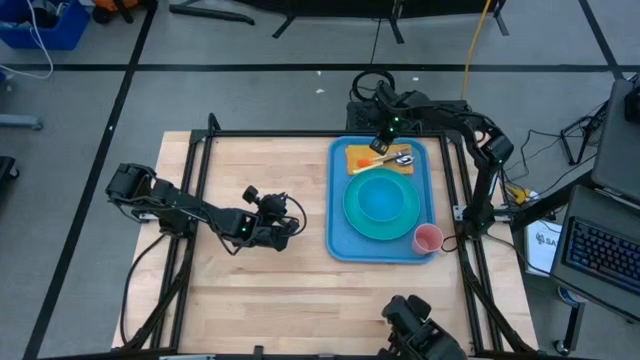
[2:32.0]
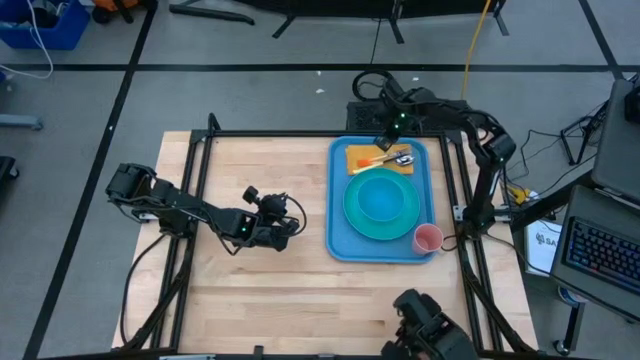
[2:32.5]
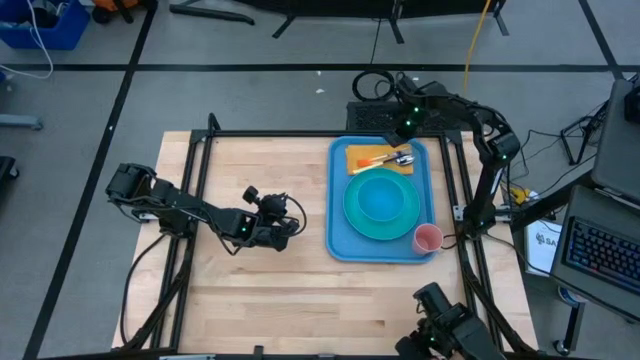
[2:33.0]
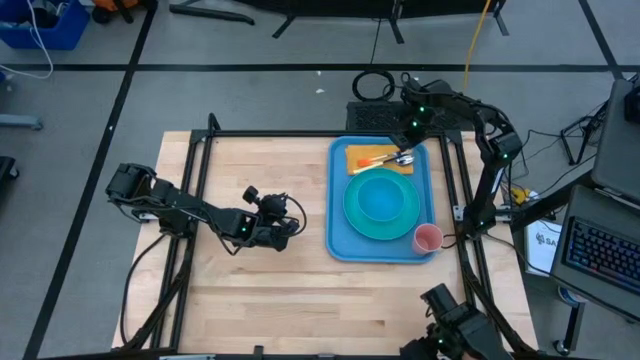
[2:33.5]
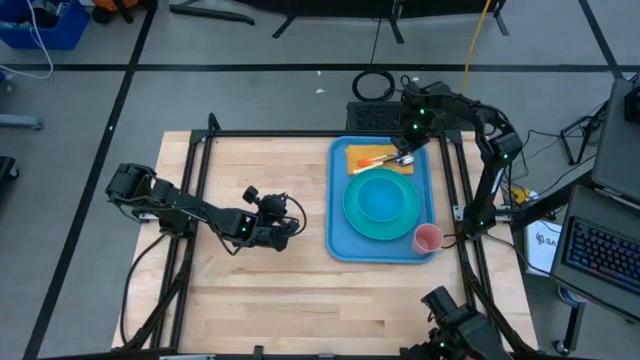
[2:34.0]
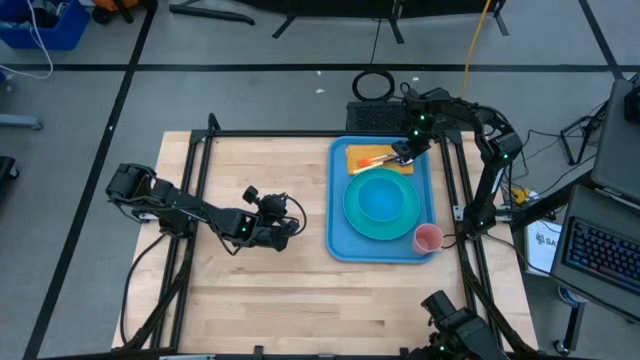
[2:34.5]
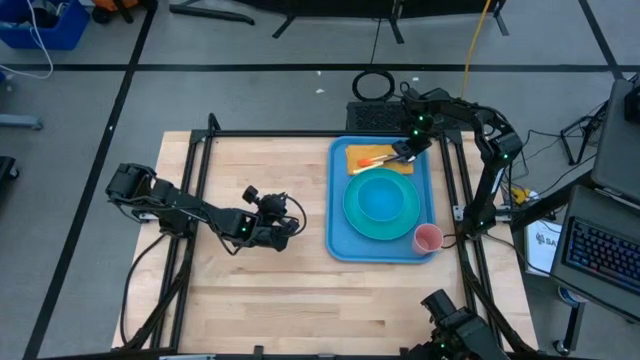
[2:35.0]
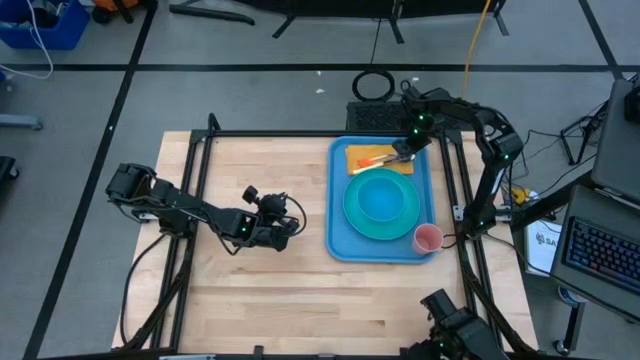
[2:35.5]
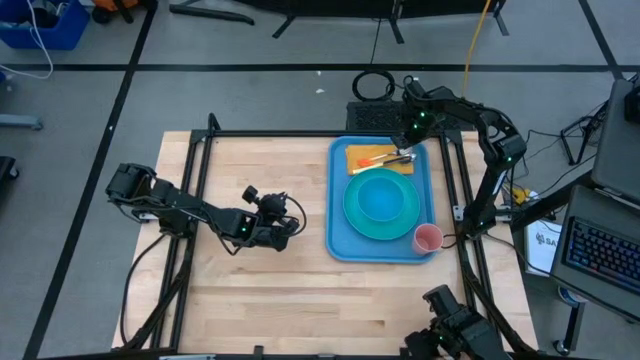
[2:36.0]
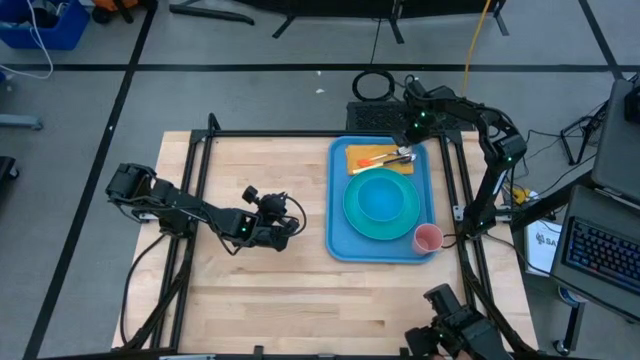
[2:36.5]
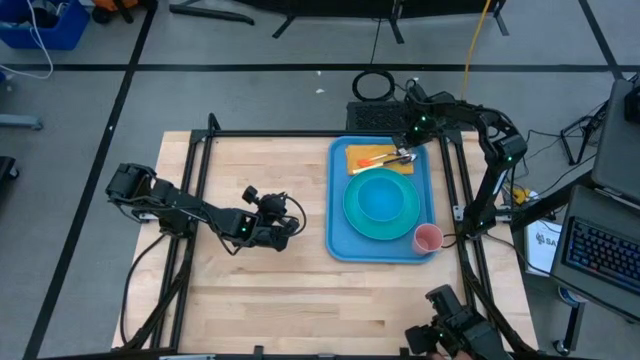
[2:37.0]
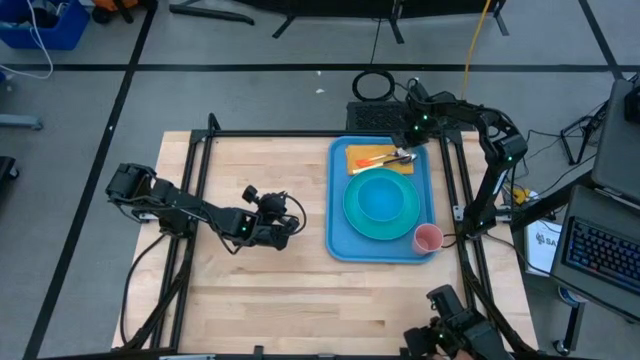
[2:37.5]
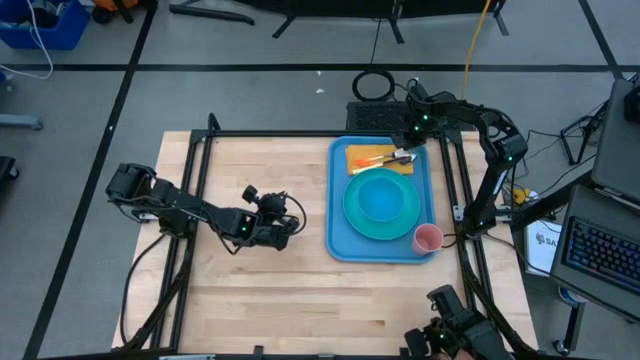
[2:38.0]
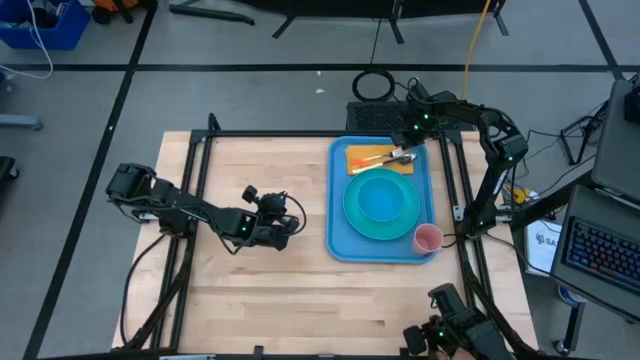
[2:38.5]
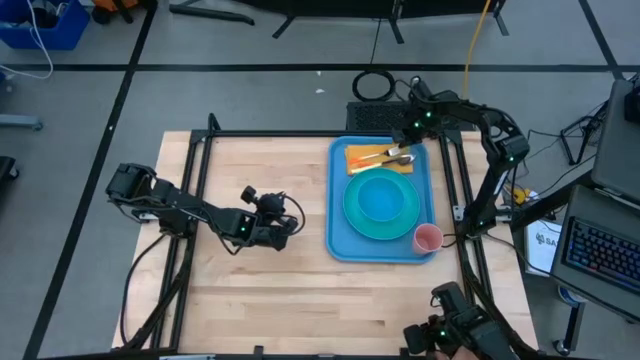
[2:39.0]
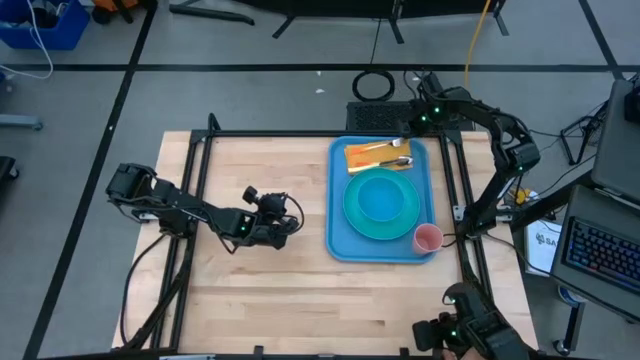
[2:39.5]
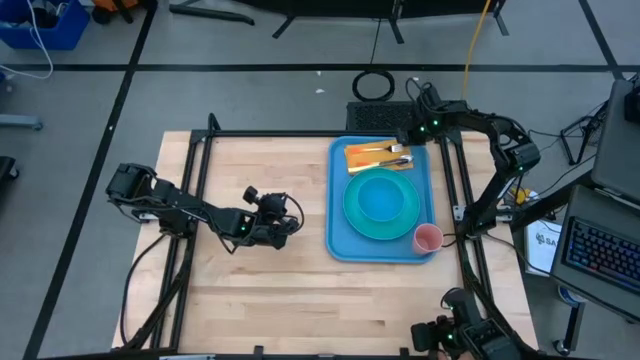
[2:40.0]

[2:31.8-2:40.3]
Task: Set up tray
Adjust the fork on the yellow table napkin on the blue serving tray

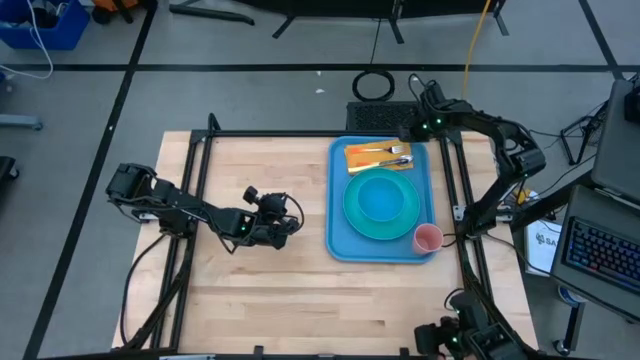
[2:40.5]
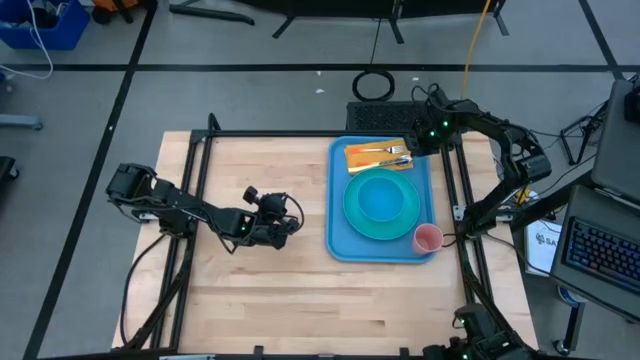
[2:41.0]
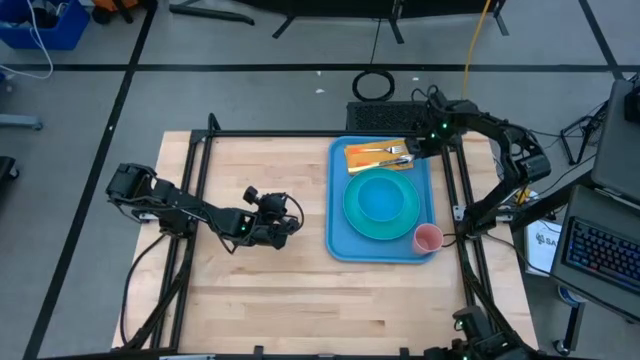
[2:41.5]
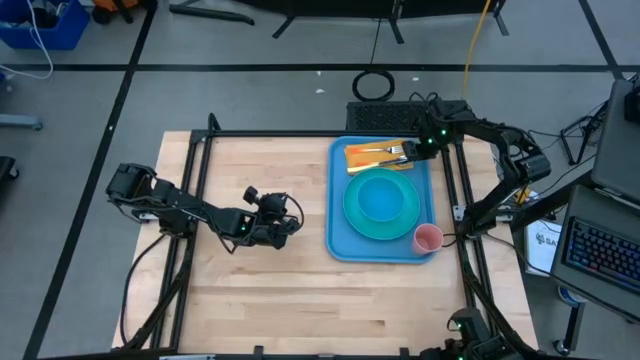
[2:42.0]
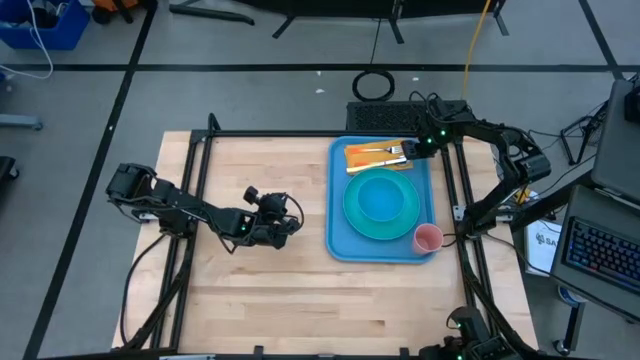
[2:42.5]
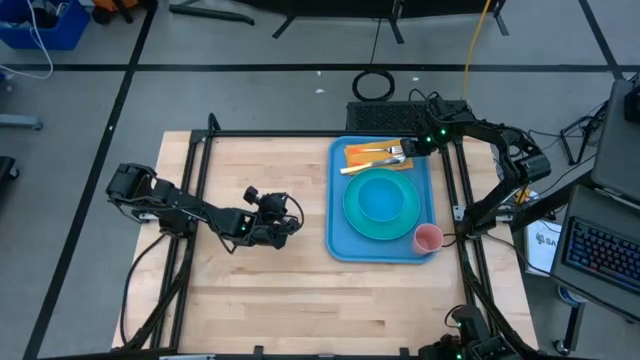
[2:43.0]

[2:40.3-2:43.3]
Adjust the orange spoon on the yellow table napkin on the blue serving tray

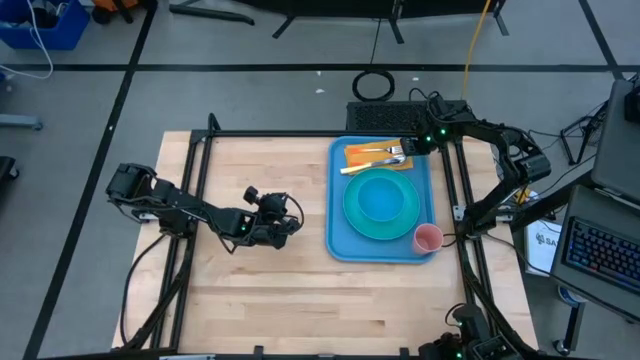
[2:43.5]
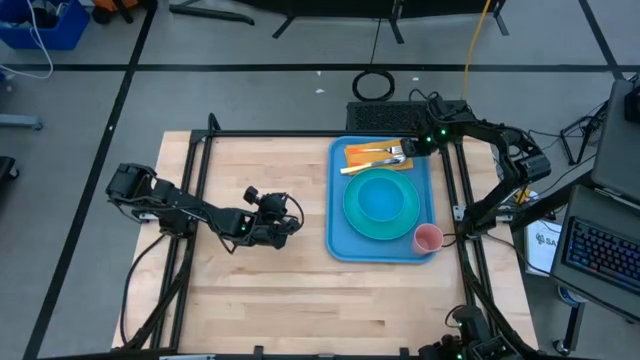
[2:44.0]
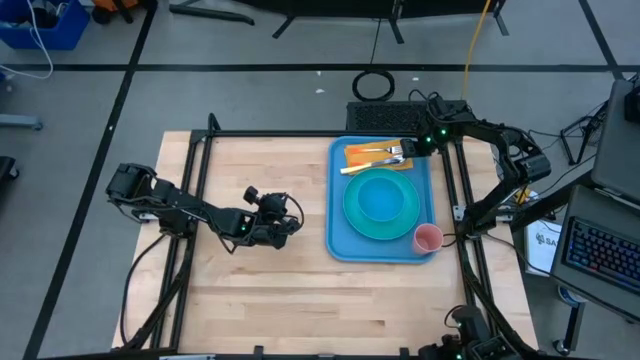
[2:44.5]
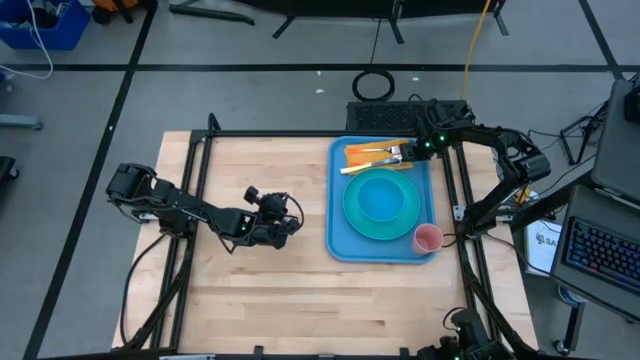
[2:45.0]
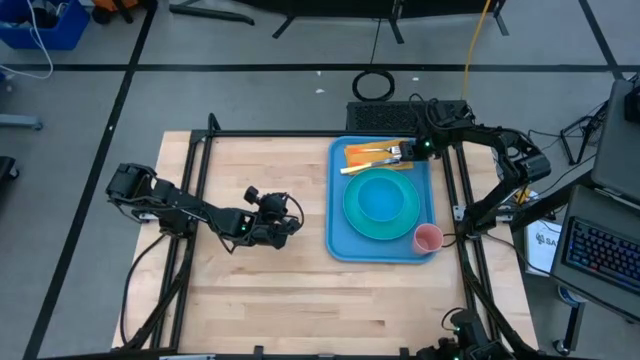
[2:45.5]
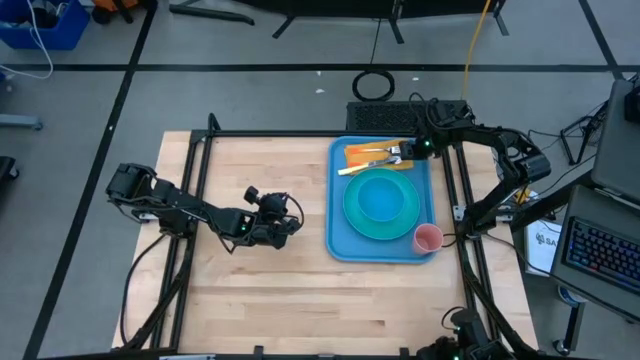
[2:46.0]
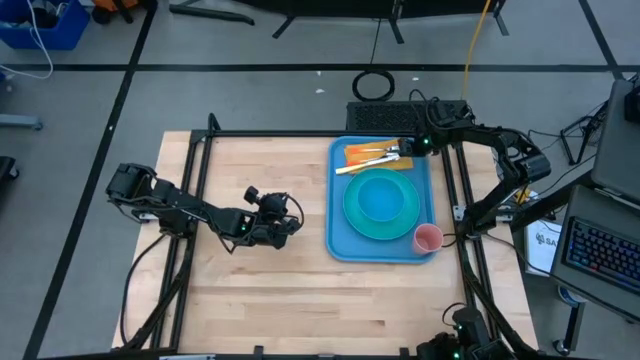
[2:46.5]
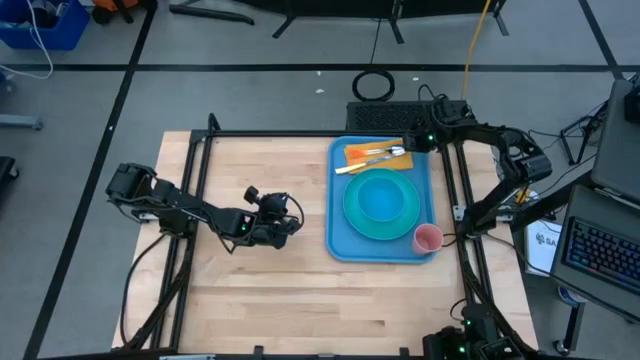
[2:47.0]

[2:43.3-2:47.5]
Adjust the orange spoon on the yellow table napkin on the blue serving tray

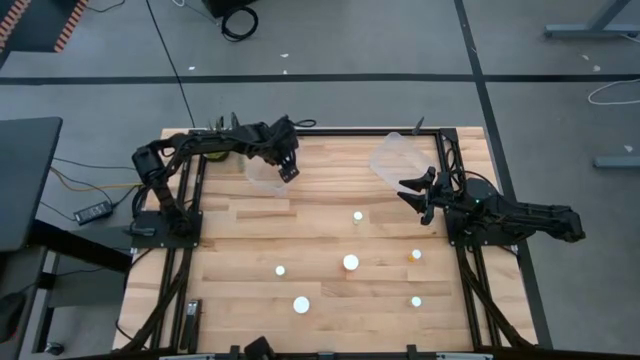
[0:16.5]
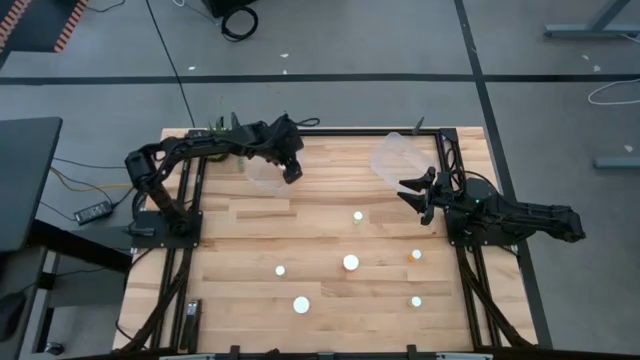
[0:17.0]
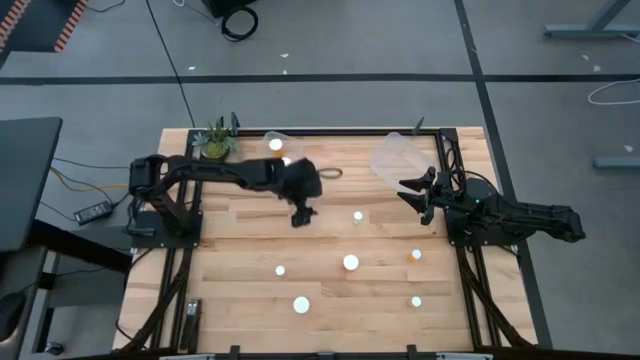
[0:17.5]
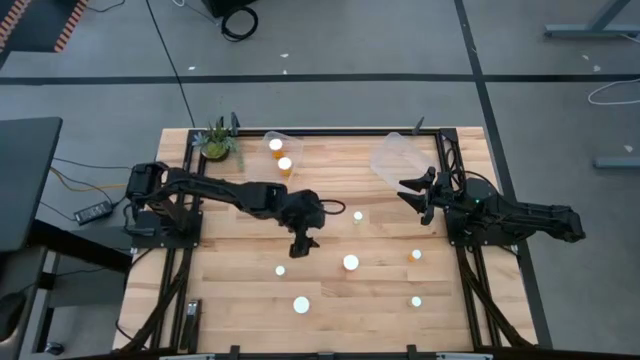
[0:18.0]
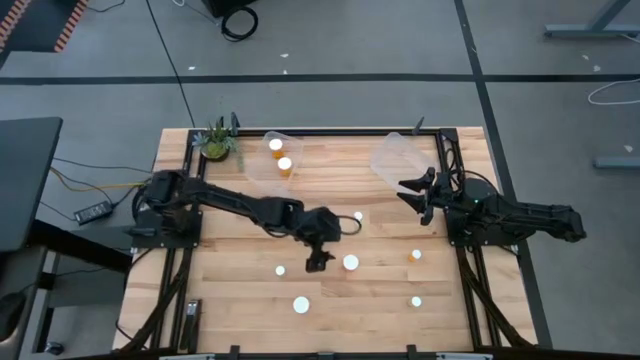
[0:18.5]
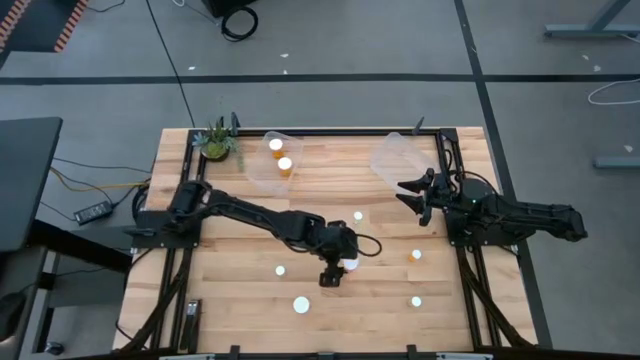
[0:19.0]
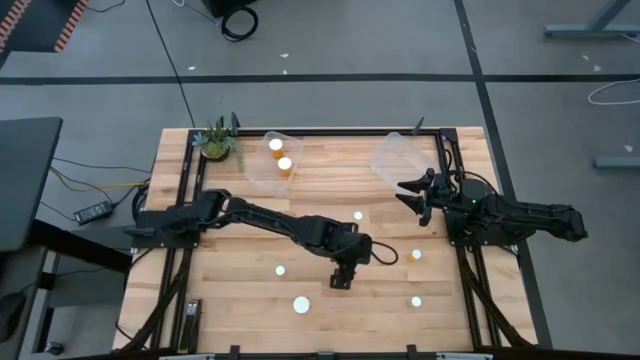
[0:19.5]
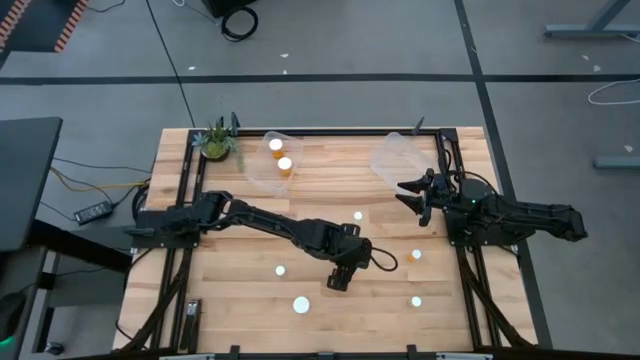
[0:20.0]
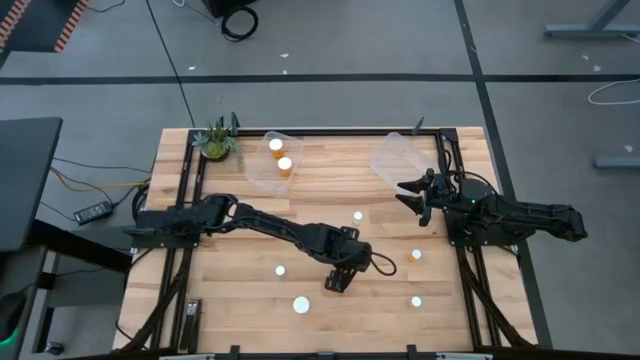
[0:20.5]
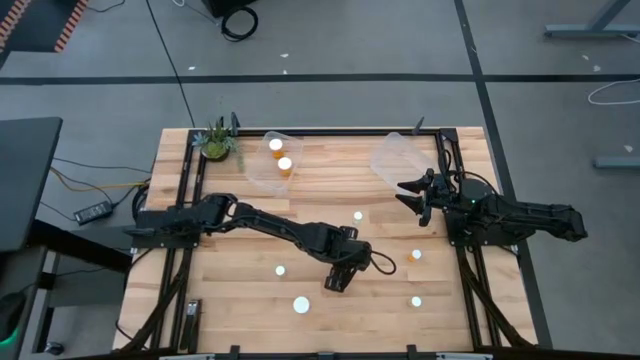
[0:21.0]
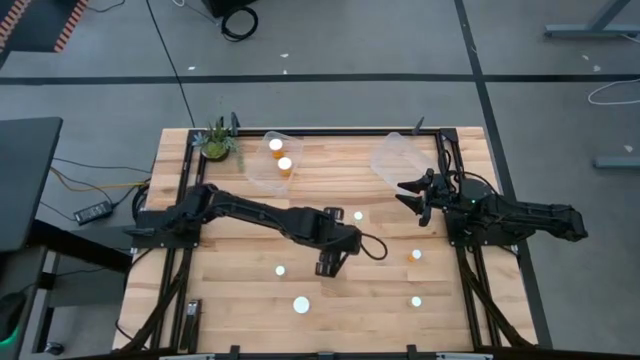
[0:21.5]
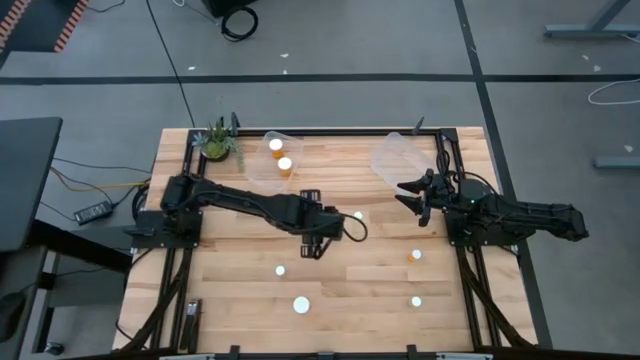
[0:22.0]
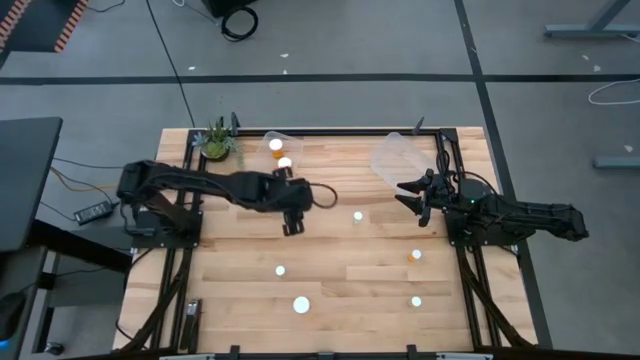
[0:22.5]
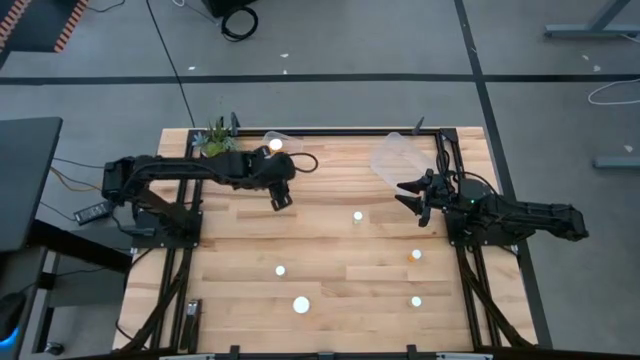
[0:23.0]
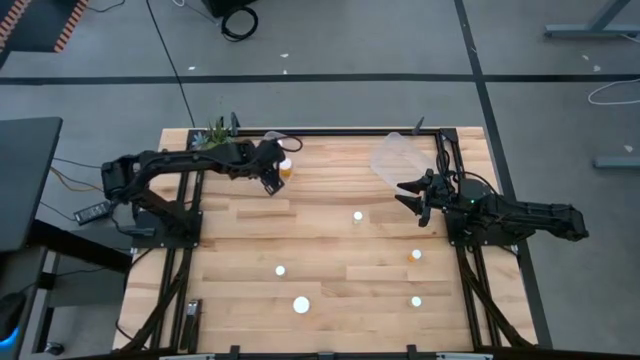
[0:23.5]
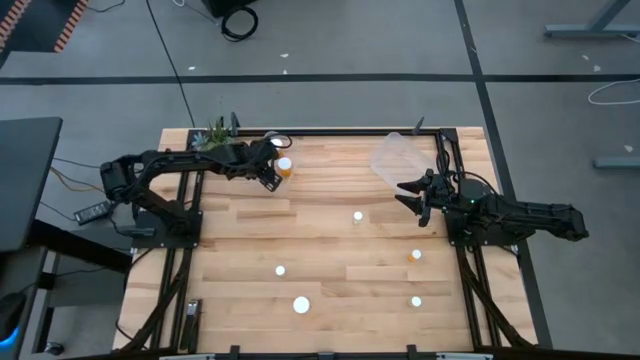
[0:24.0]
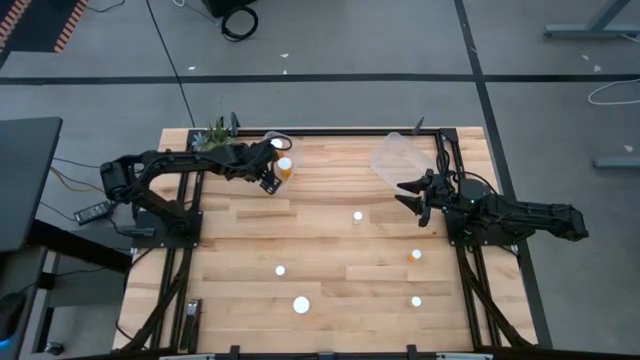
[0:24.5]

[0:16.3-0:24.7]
Task: Pick and place medicine bottles into bin by pill shape (circle, oval)
Put the large orange pill bottle into the left transparent bin
